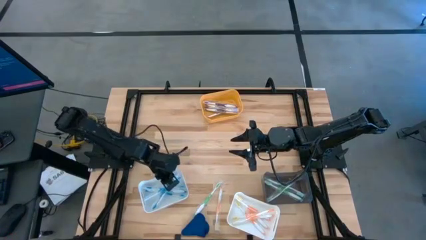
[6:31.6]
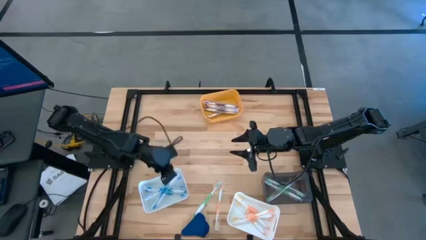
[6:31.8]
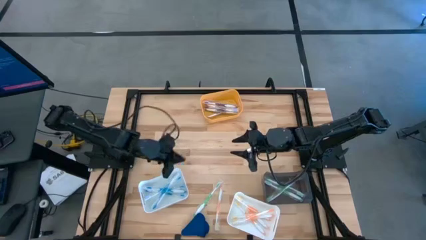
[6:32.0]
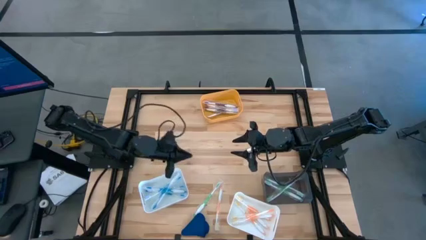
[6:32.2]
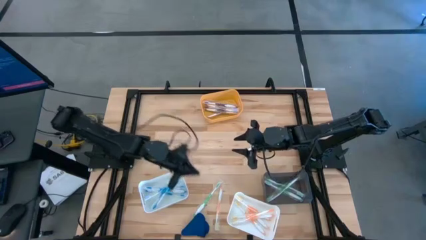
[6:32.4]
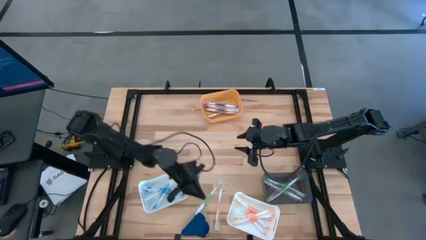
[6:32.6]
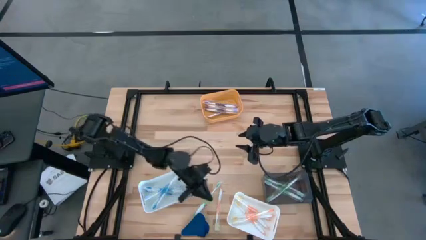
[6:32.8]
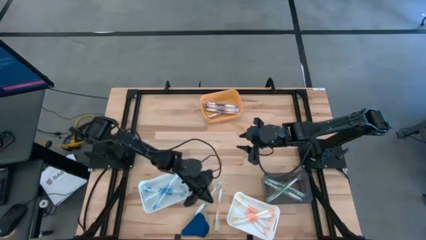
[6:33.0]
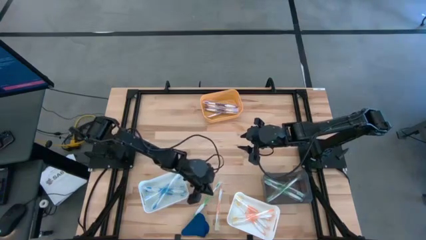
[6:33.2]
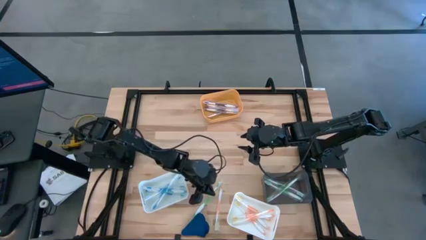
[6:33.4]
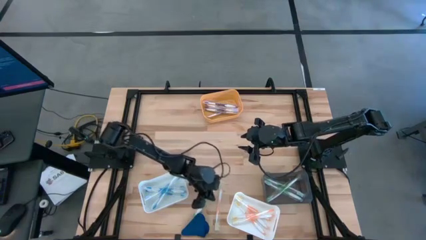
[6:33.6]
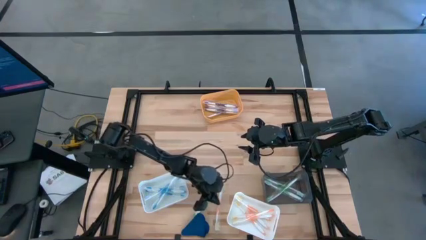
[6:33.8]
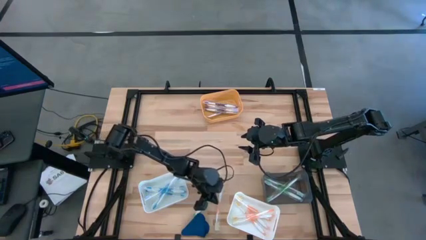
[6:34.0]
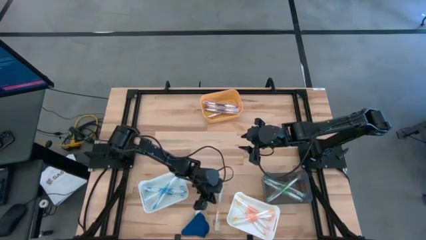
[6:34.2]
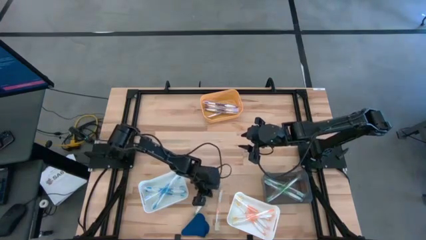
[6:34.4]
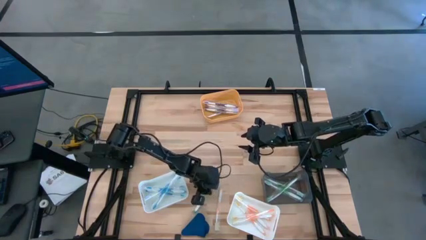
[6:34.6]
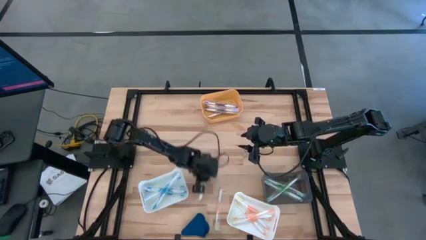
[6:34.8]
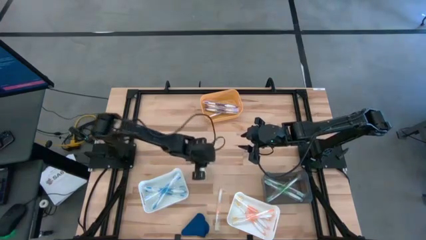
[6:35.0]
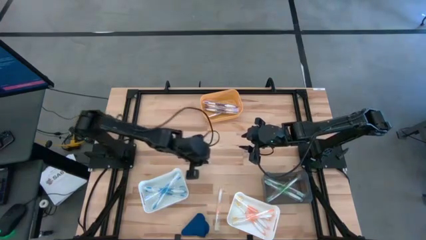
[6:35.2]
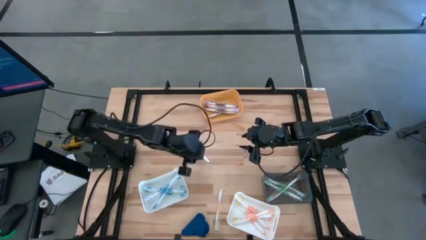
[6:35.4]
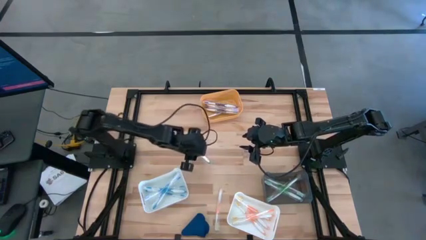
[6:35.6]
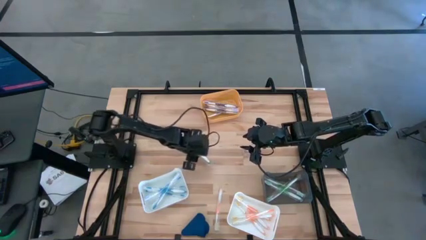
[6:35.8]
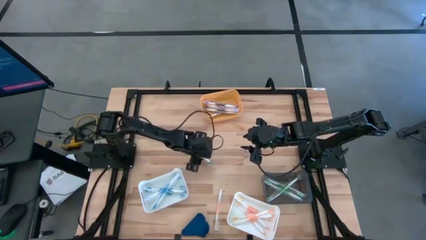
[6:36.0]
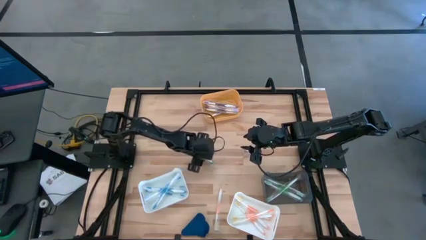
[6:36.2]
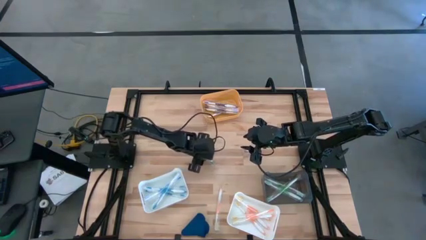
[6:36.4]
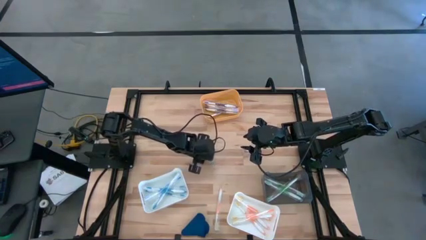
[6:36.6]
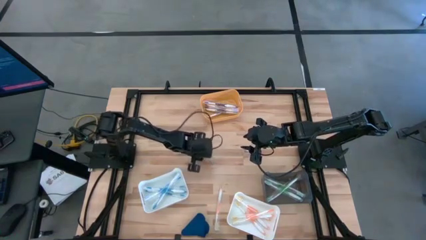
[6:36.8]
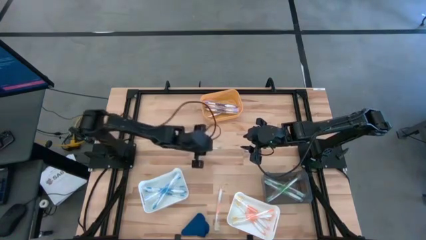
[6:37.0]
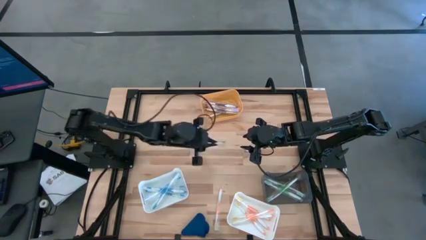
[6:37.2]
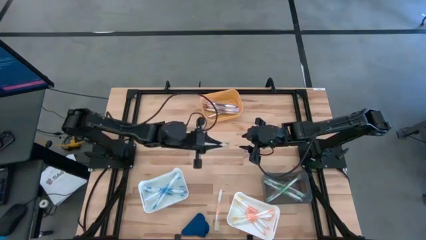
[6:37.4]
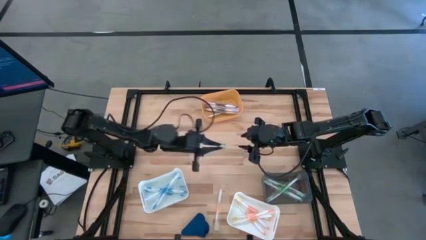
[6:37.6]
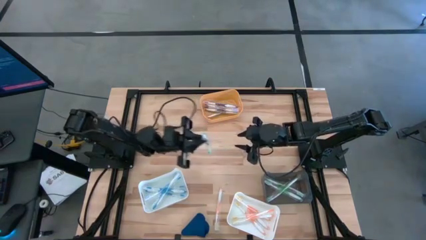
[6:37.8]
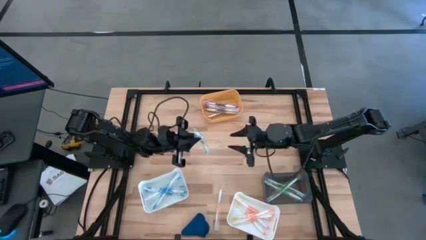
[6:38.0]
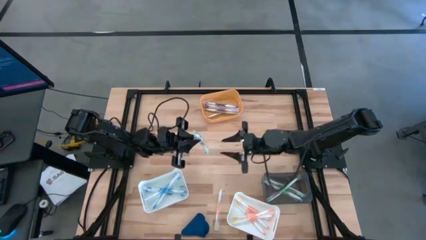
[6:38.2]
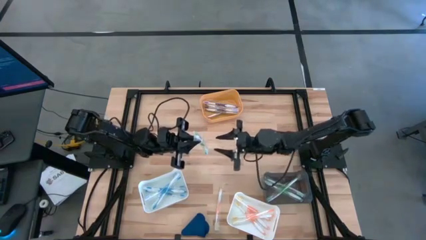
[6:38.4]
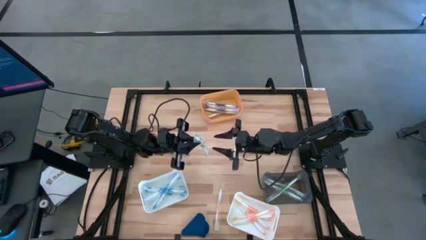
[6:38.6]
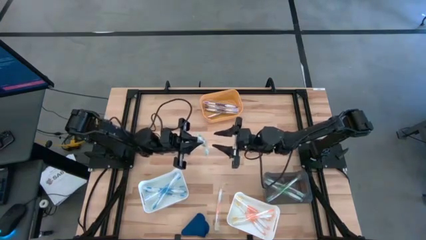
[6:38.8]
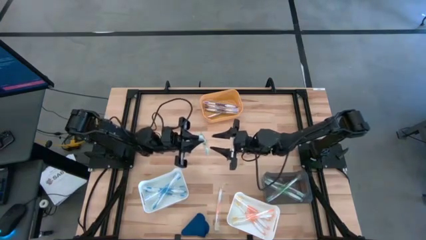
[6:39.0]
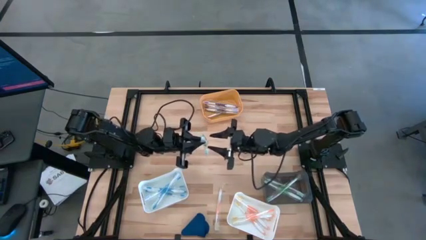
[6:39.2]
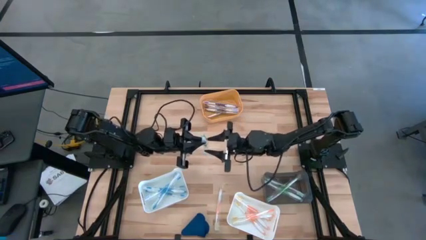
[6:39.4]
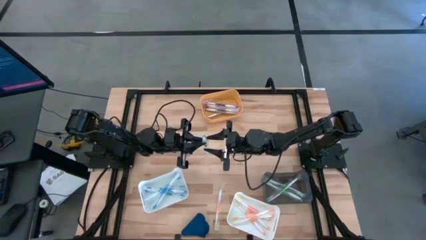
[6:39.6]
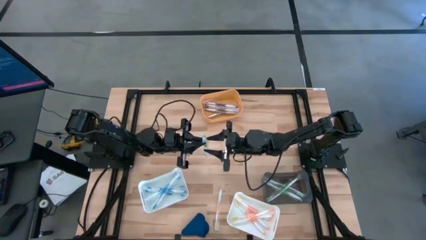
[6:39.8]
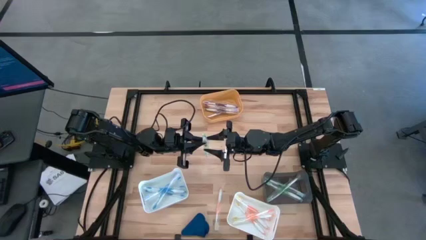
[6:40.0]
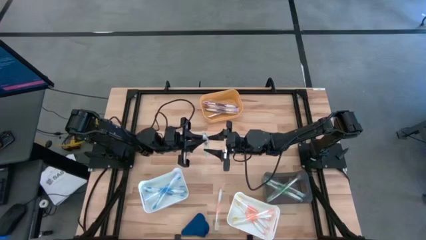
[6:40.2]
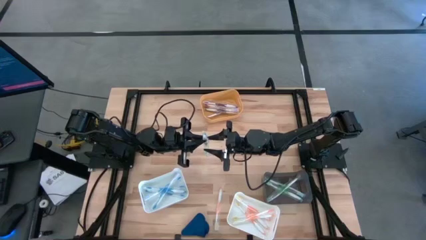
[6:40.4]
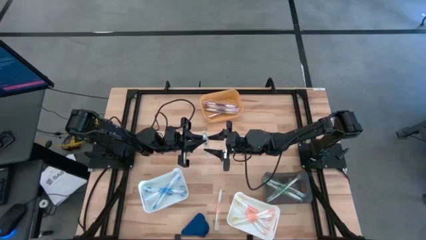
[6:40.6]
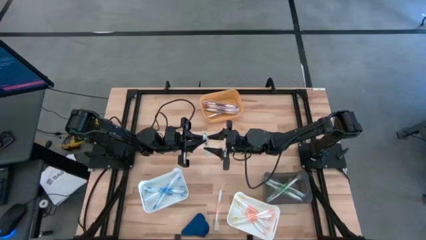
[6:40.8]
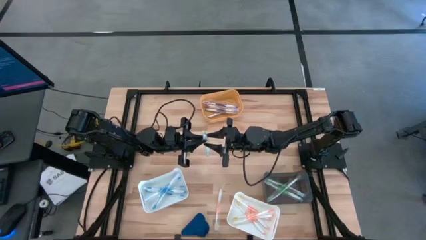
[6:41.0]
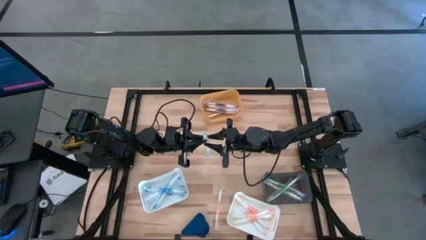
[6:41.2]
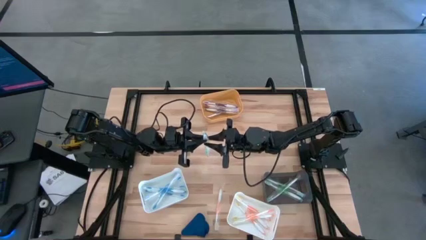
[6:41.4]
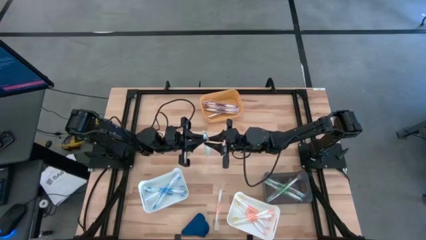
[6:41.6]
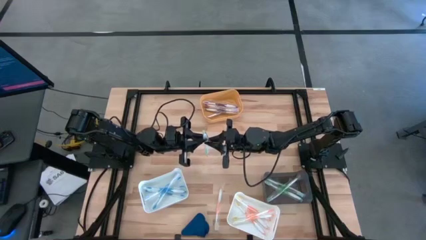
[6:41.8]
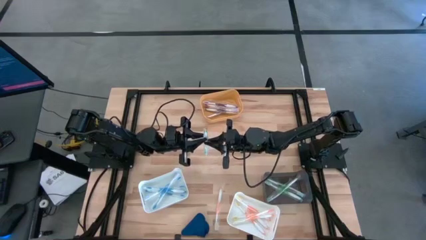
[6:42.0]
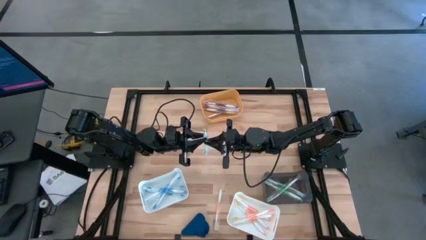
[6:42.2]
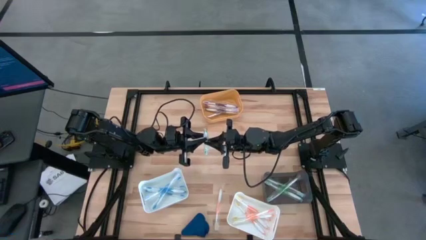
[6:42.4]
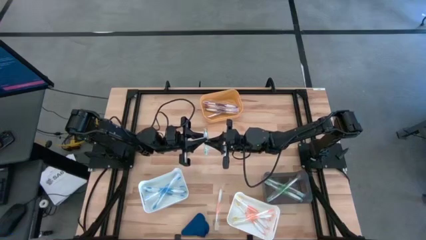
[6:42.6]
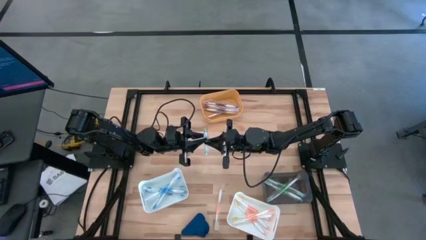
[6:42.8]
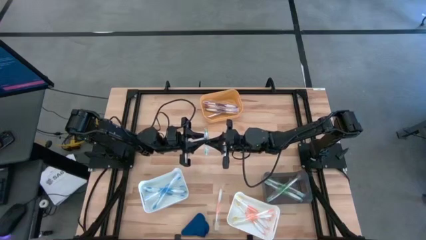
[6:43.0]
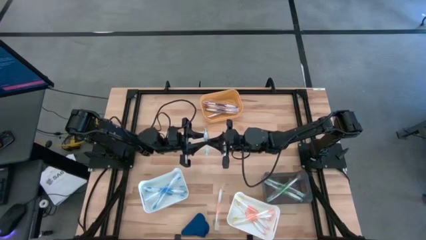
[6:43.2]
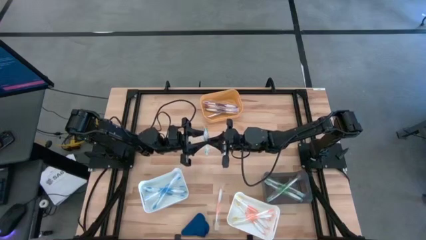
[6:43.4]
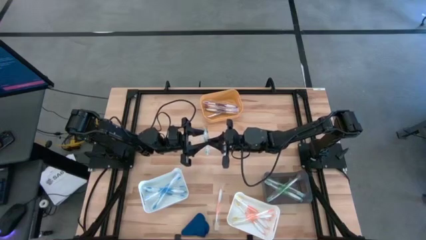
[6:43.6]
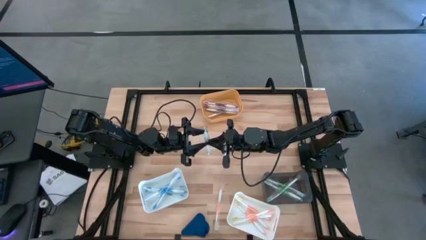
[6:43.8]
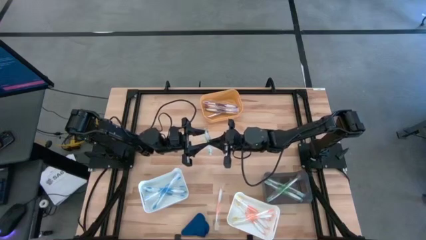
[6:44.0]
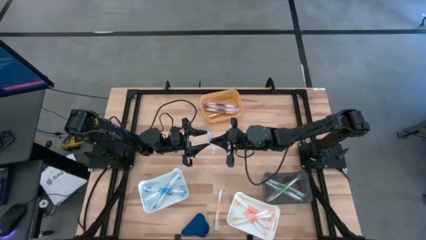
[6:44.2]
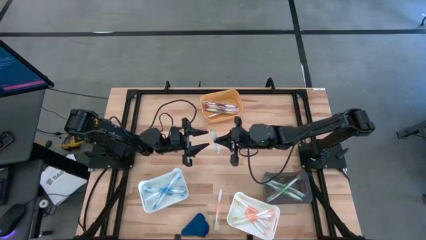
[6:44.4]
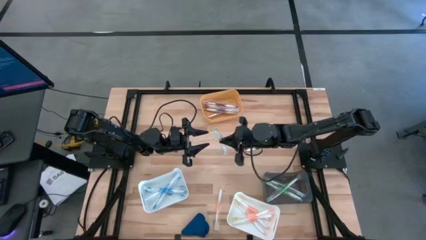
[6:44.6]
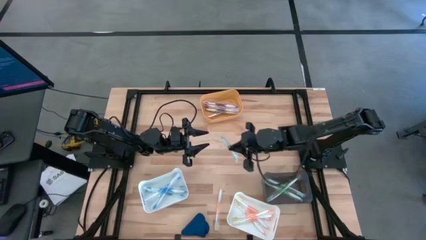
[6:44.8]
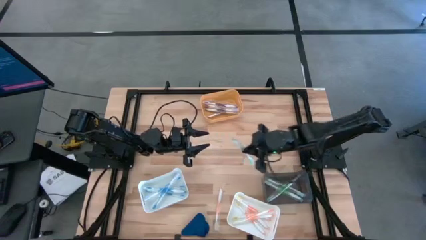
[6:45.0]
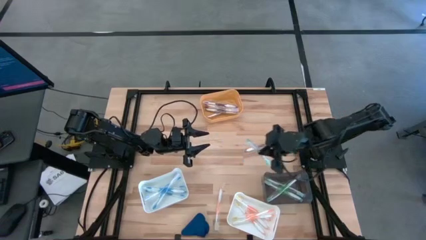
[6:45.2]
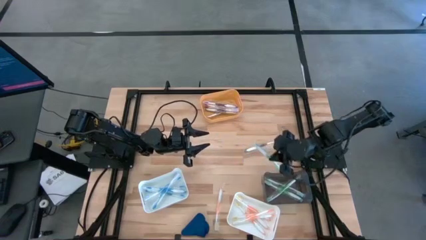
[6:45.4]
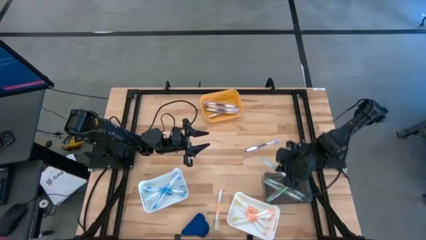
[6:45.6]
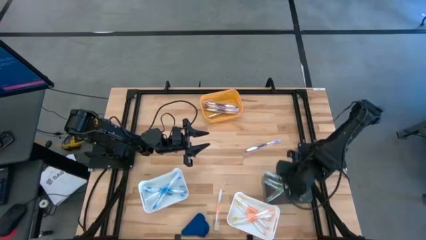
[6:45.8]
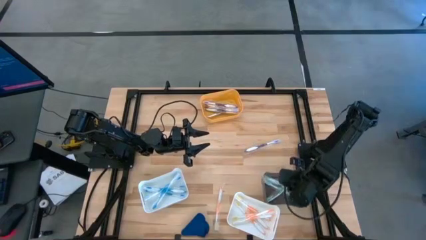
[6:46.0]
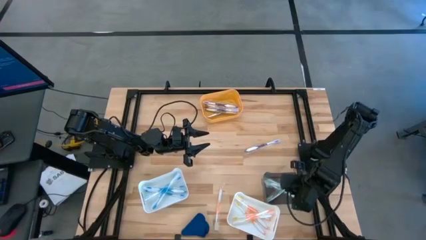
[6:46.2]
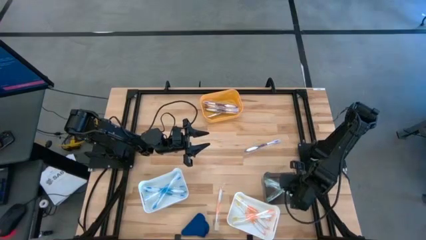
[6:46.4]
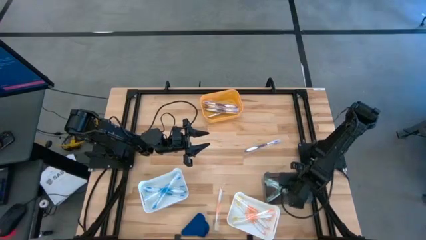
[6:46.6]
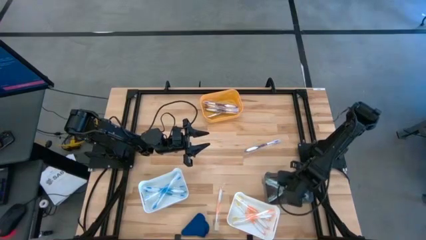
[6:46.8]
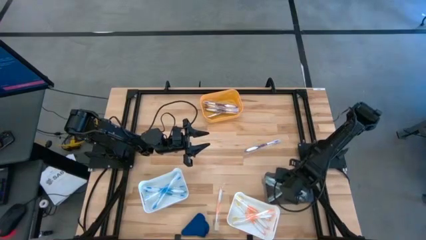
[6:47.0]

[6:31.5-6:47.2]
Task: Pick & Place Toothbrushes
Put the green toothbrush into the black bin
